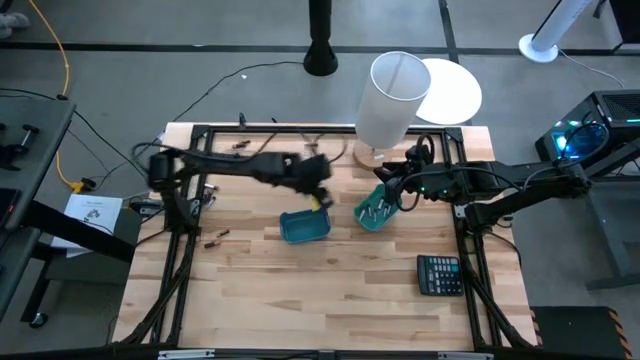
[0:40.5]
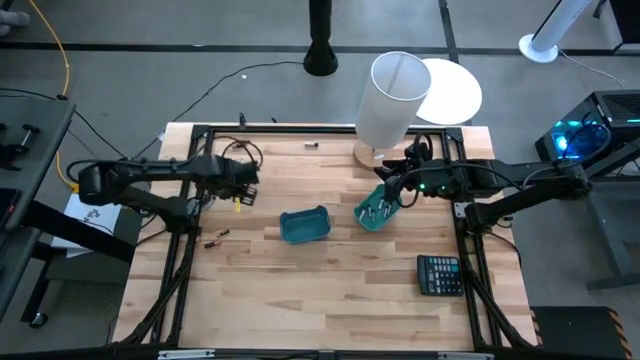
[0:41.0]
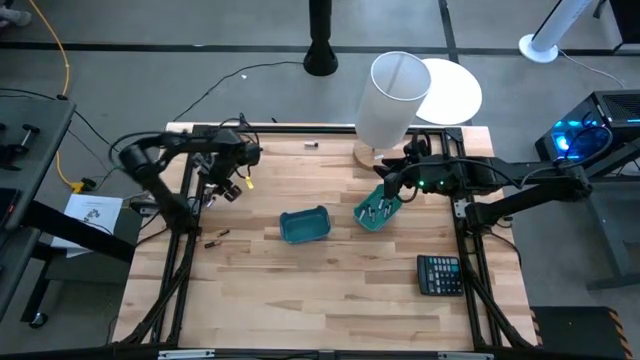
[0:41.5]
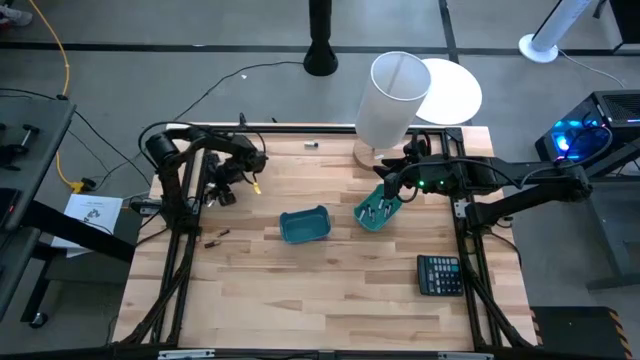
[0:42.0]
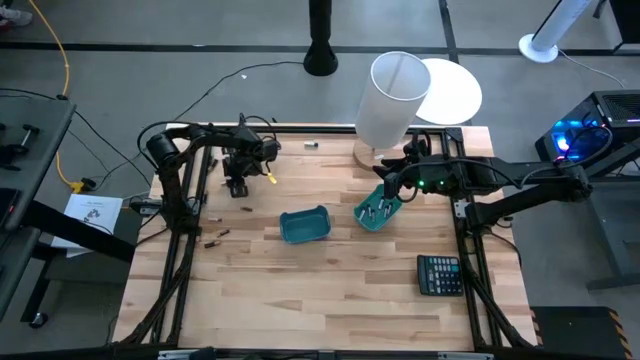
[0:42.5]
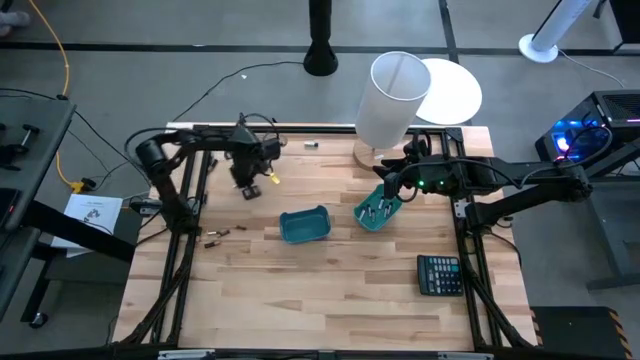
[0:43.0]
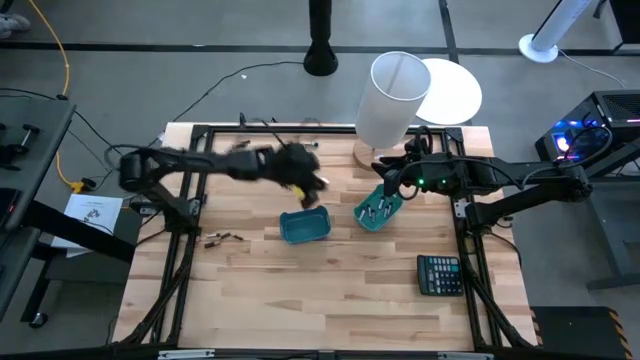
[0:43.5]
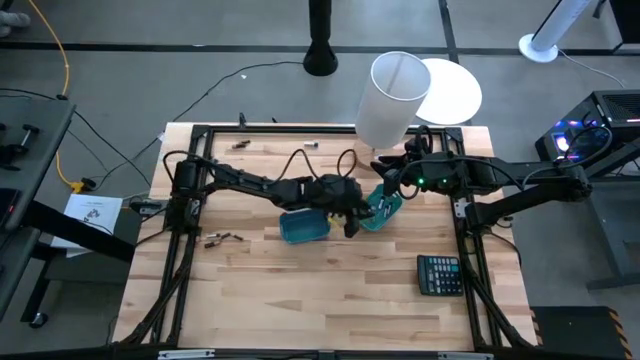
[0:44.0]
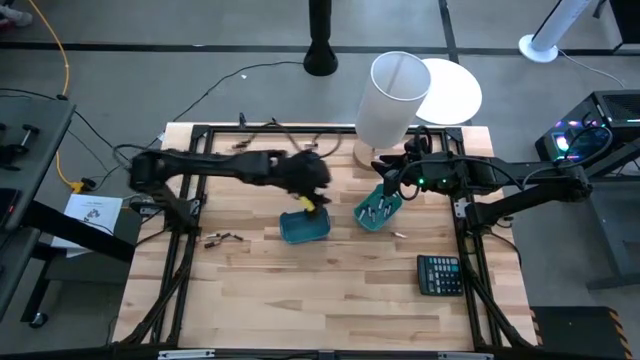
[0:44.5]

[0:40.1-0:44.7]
Task: Sort batteries
Put the silver battery into the green bin

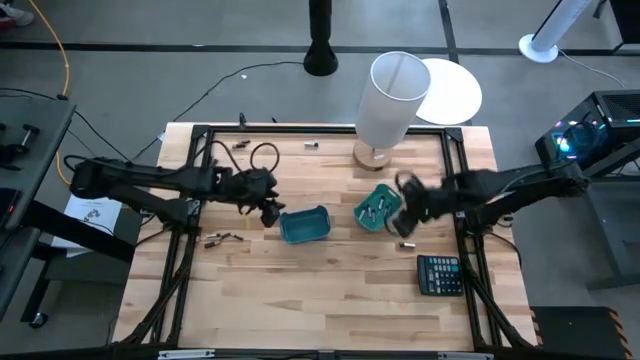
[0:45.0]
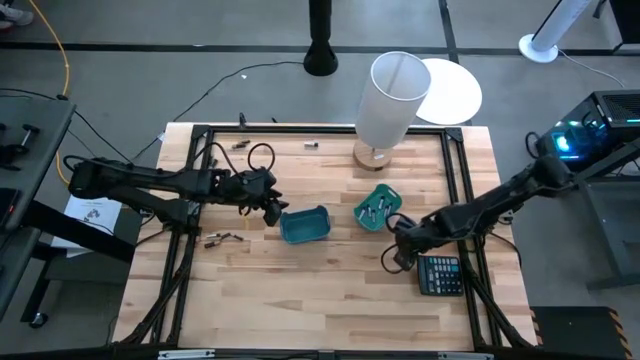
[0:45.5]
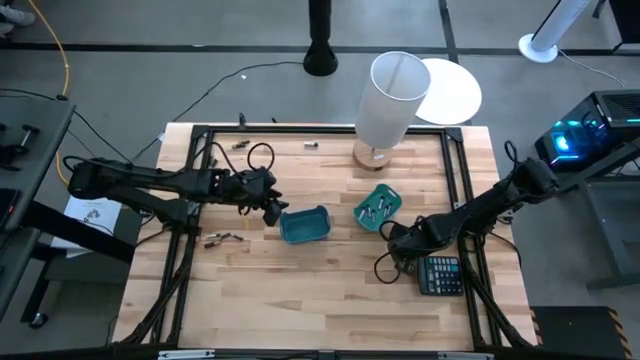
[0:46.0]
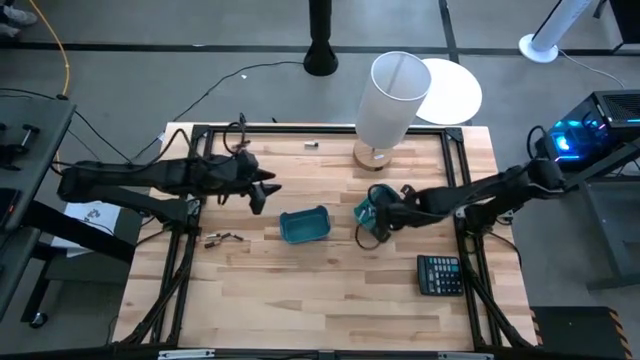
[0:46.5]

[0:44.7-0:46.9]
Put the silver battery into the green bin

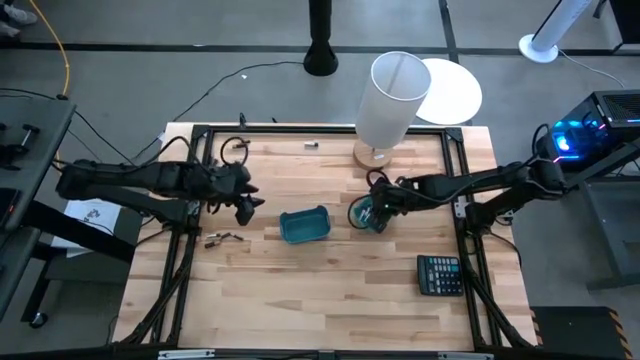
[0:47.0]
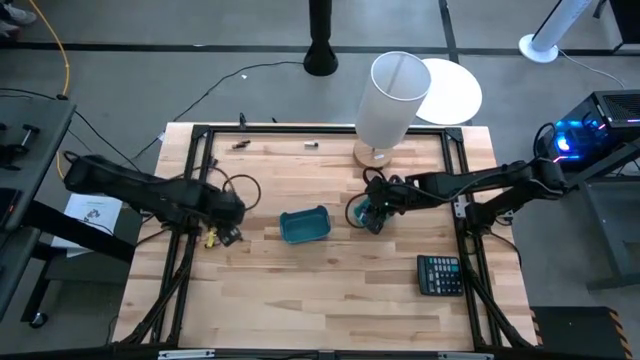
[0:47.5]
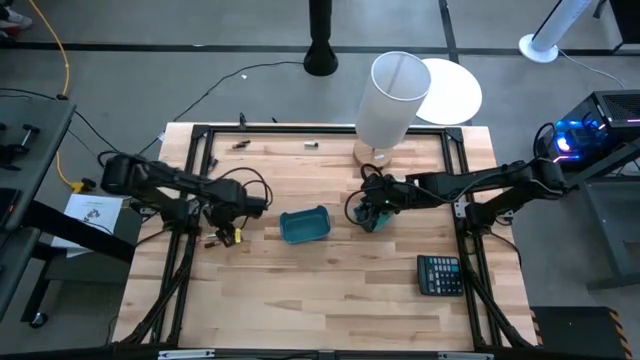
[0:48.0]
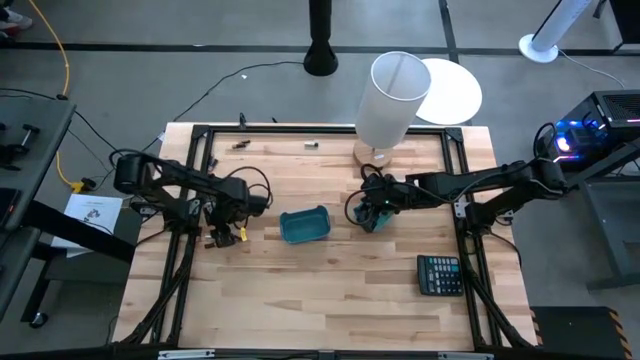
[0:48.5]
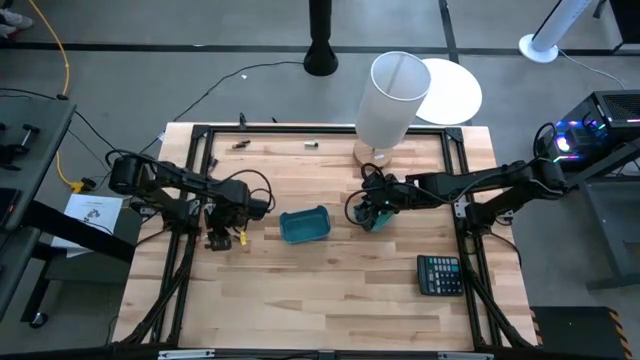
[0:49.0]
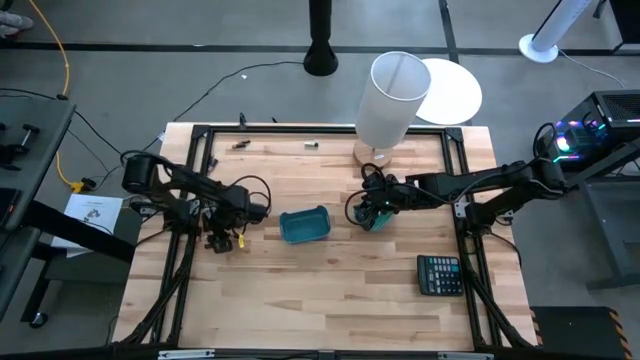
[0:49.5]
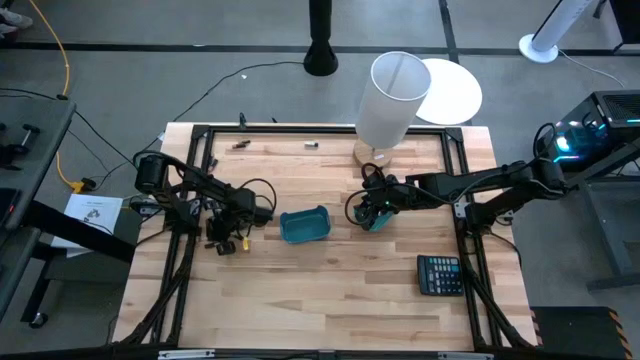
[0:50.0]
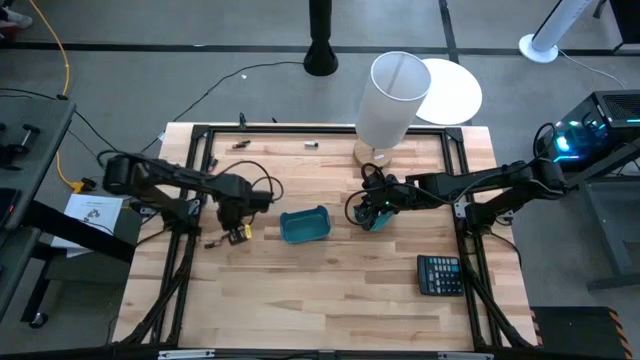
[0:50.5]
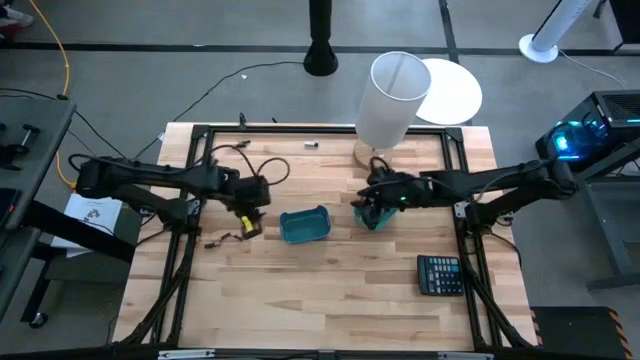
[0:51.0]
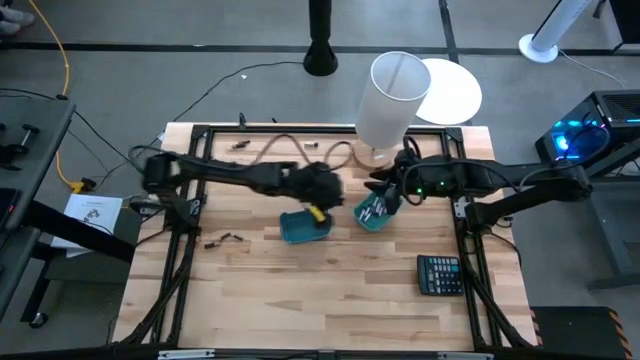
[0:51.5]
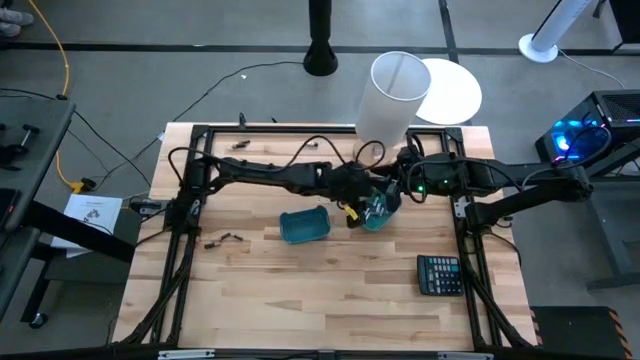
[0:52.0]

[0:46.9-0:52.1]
Put the silver battery into the green bin

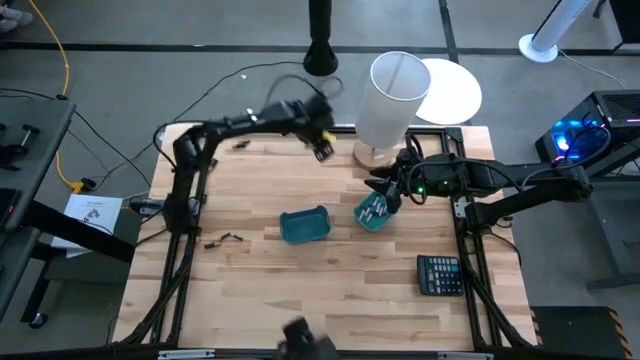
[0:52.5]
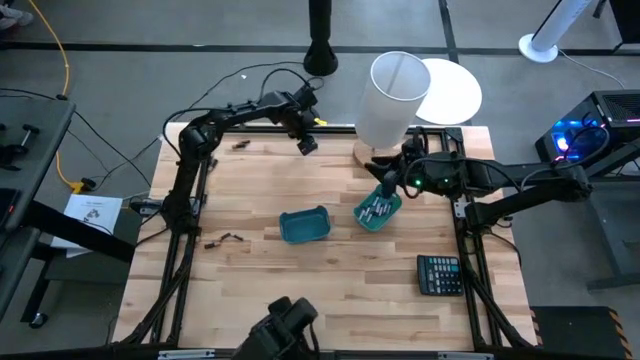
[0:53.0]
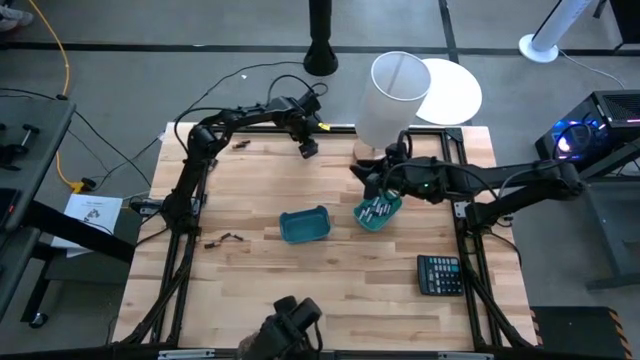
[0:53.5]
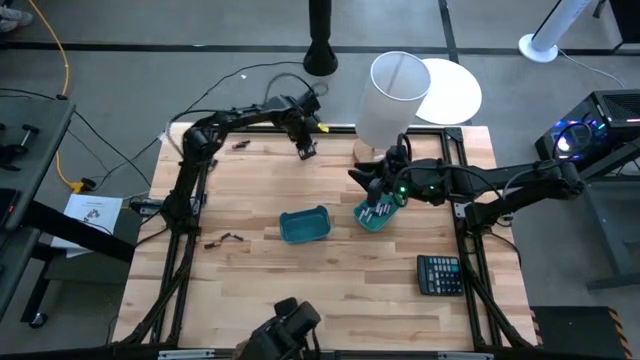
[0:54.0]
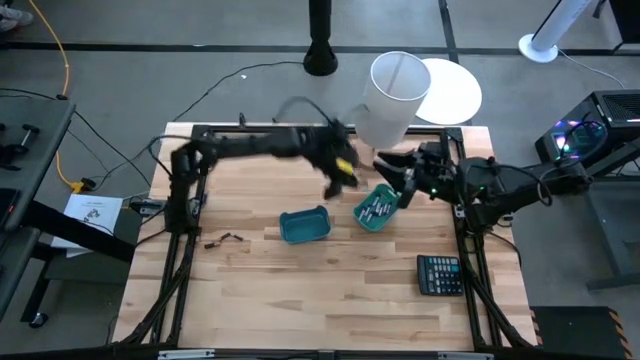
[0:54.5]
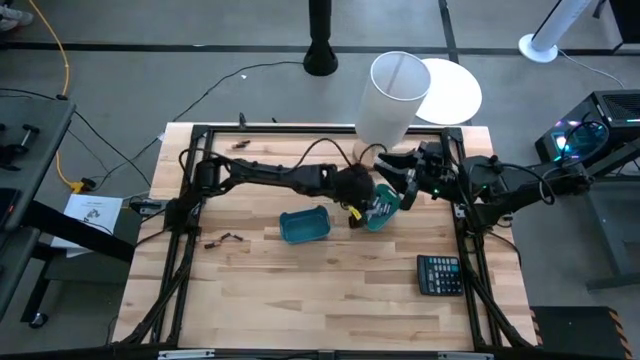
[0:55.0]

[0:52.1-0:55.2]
Put the silver battery into the green bin

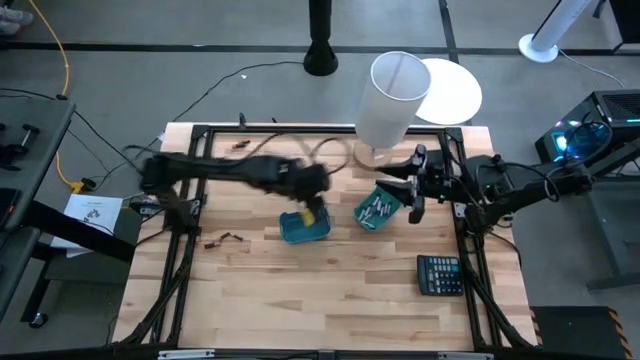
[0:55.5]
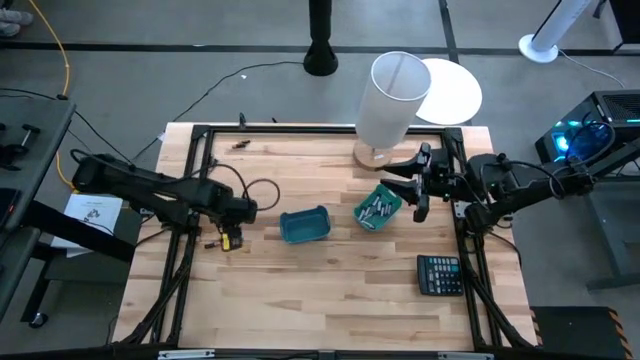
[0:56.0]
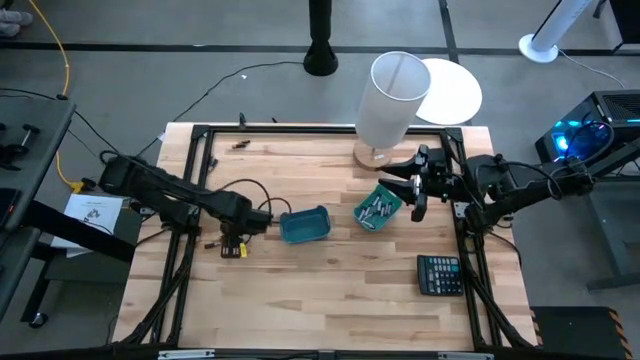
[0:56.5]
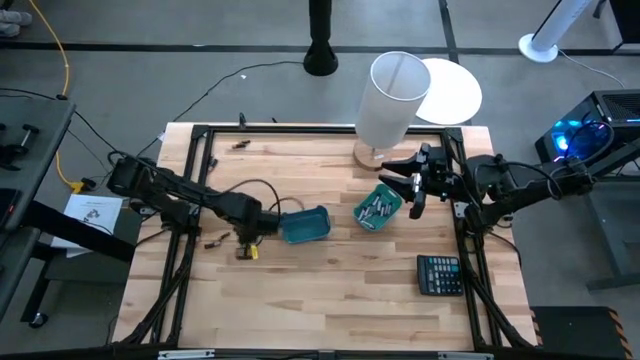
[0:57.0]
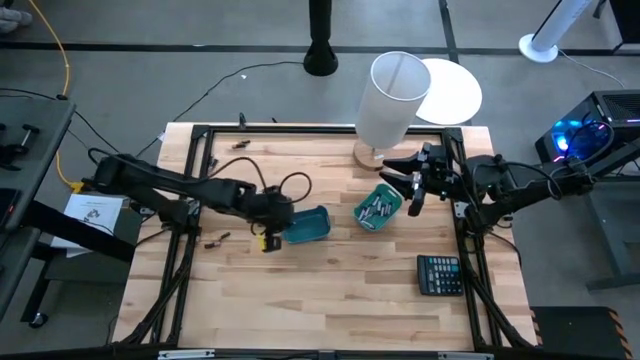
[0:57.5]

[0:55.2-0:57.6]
Put the black battery into the blue bin

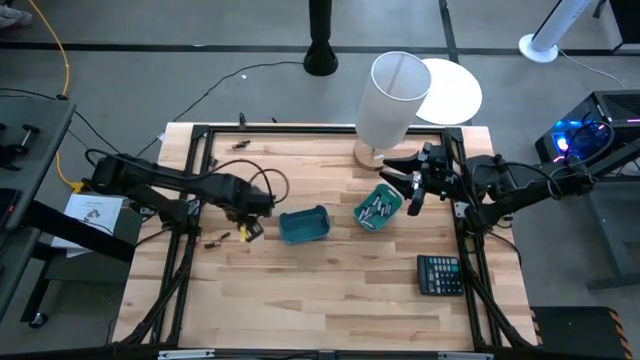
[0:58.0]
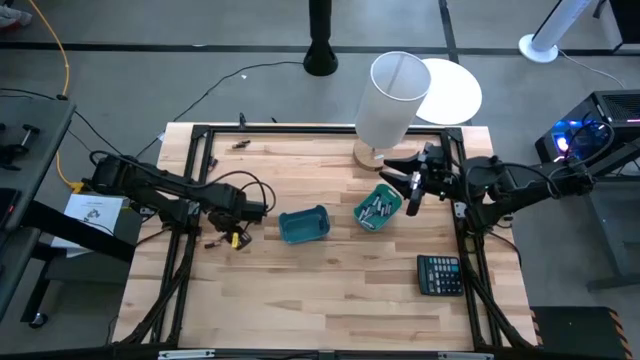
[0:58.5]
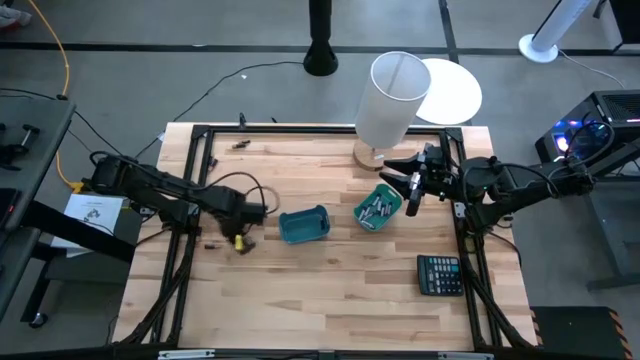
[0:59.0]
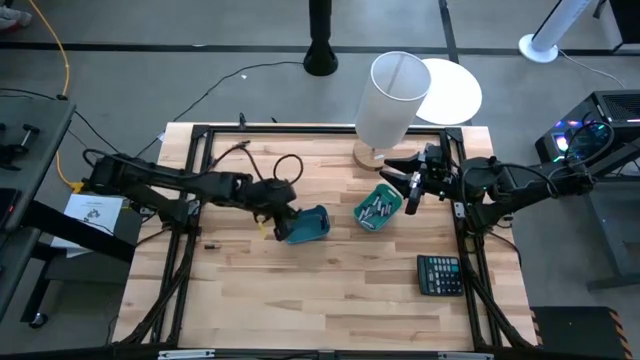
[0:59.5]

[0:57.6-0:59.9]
Put the black battery into the blue bin

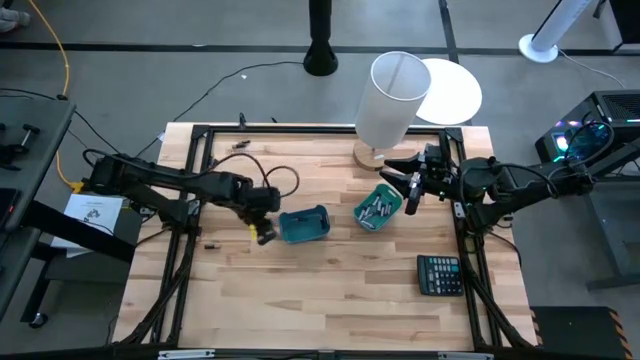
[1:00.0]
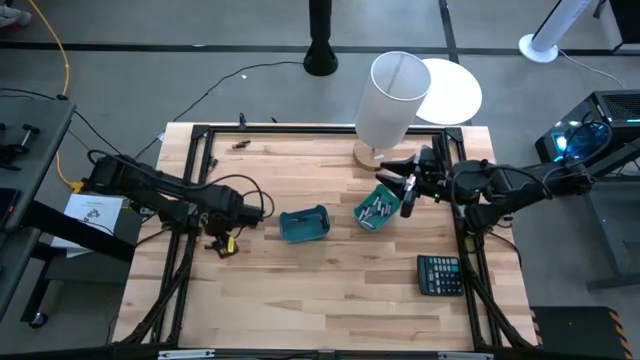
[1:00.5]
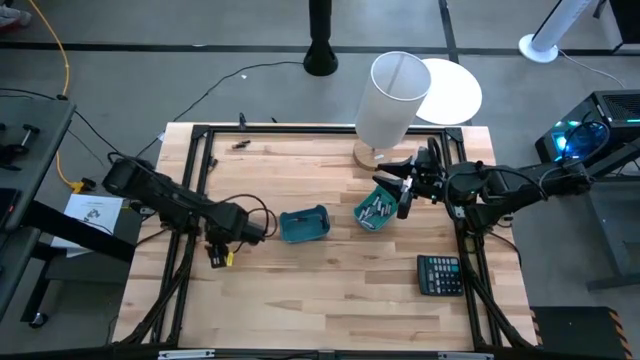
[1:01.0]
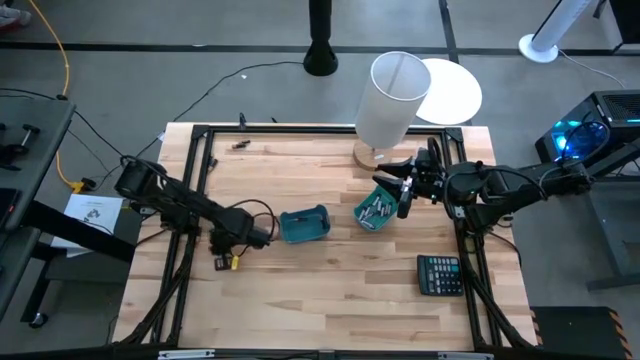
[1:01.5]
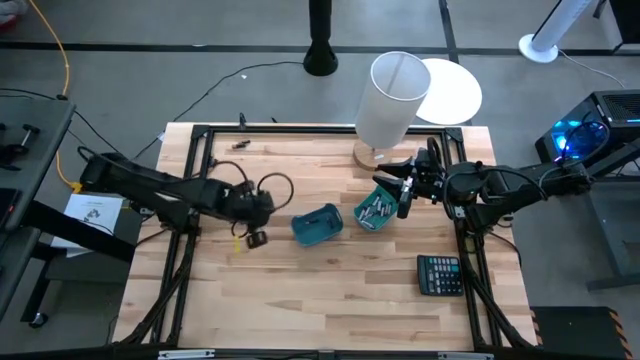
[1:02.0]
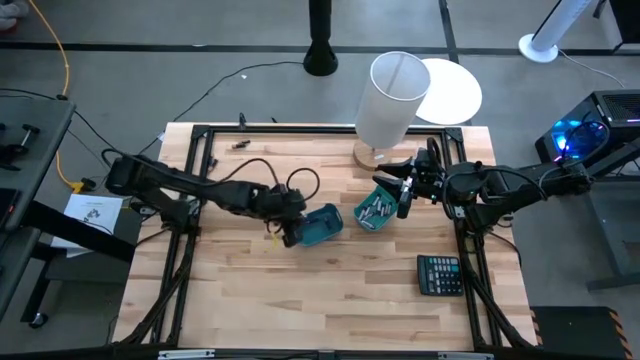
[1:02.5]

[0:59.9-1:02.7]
Put the black battery into the blue bin
